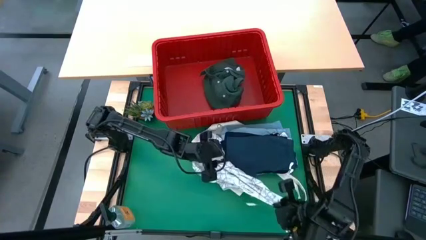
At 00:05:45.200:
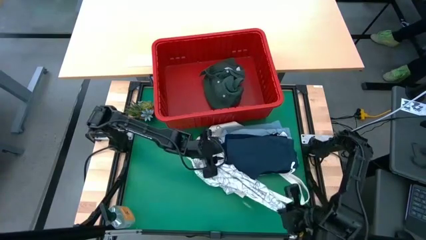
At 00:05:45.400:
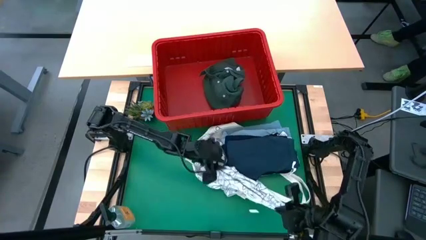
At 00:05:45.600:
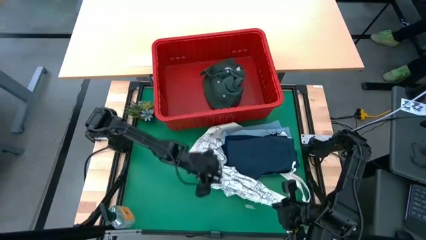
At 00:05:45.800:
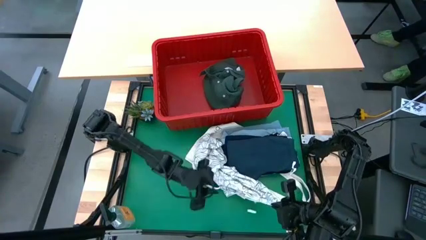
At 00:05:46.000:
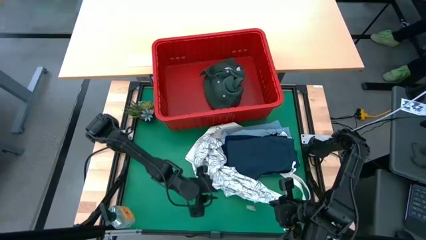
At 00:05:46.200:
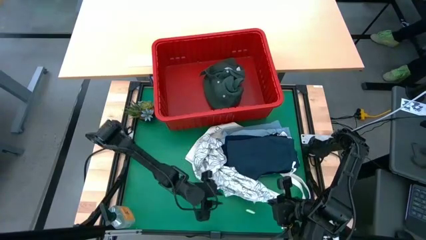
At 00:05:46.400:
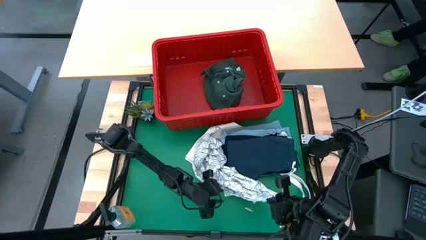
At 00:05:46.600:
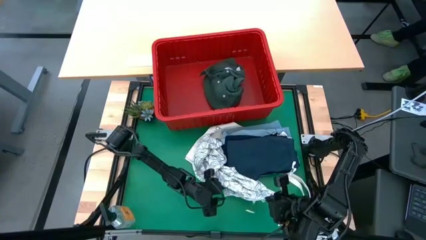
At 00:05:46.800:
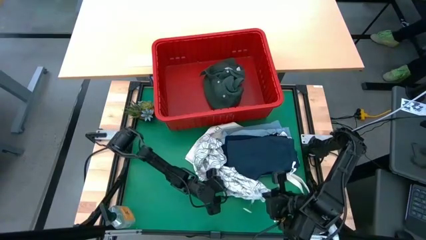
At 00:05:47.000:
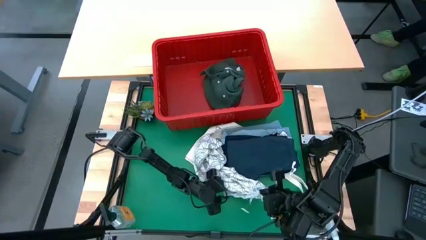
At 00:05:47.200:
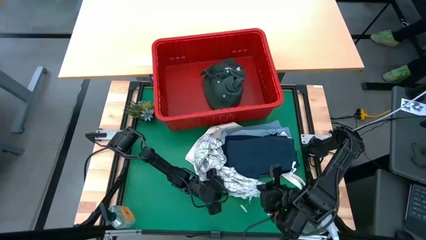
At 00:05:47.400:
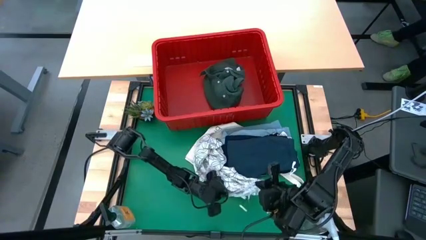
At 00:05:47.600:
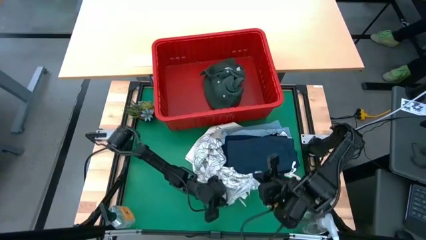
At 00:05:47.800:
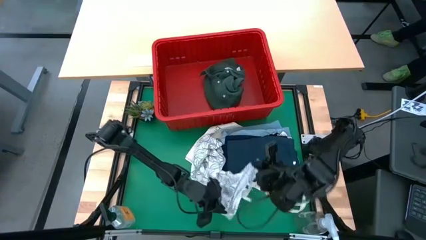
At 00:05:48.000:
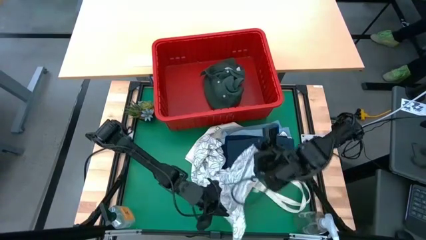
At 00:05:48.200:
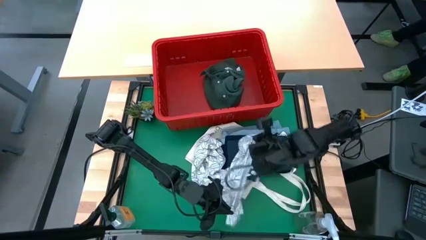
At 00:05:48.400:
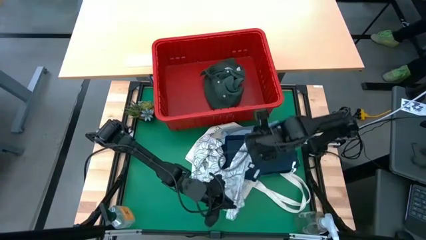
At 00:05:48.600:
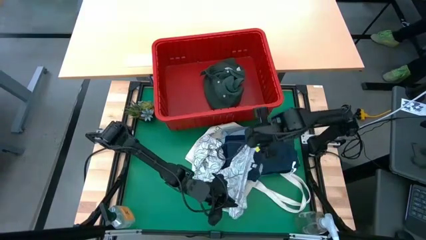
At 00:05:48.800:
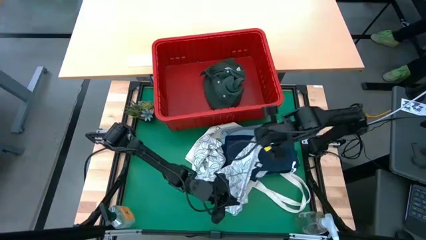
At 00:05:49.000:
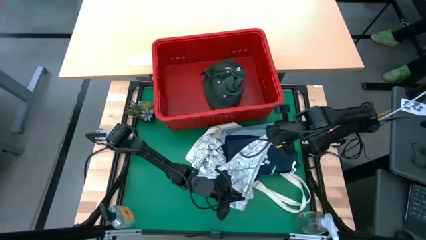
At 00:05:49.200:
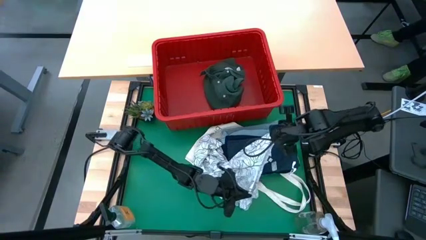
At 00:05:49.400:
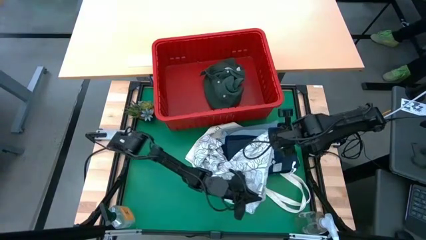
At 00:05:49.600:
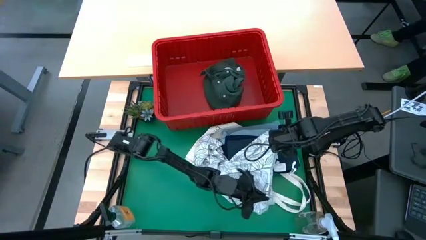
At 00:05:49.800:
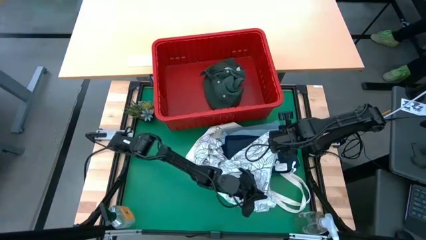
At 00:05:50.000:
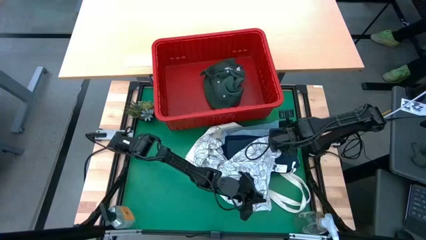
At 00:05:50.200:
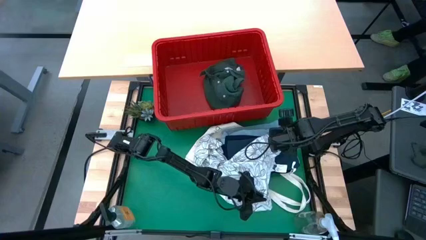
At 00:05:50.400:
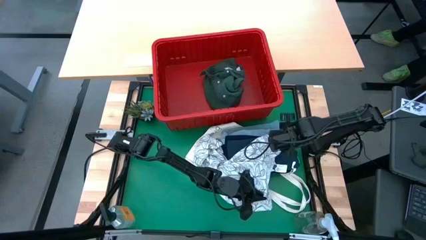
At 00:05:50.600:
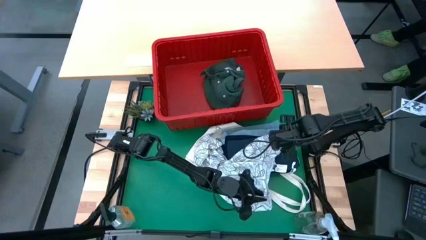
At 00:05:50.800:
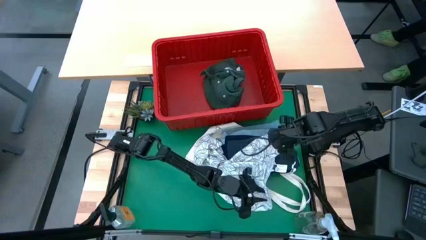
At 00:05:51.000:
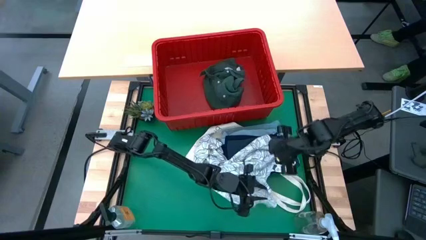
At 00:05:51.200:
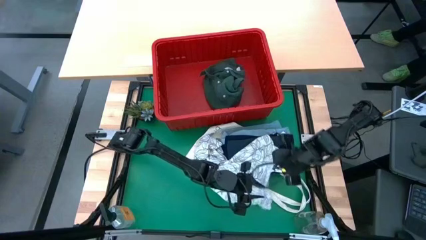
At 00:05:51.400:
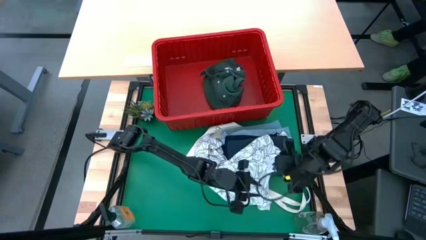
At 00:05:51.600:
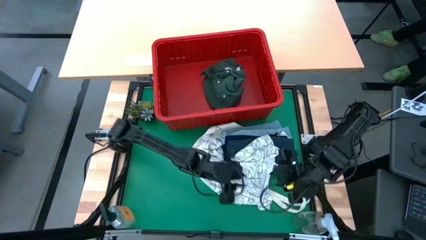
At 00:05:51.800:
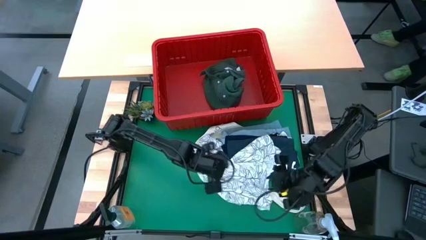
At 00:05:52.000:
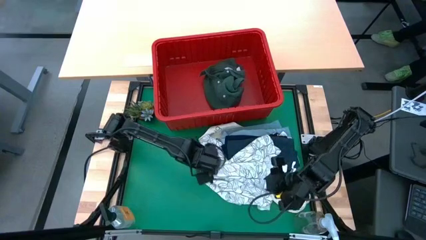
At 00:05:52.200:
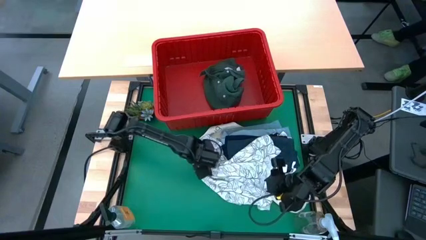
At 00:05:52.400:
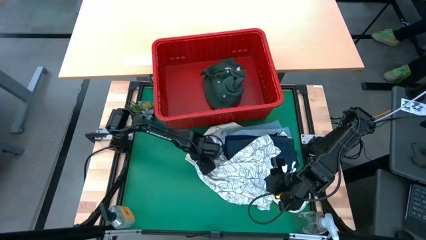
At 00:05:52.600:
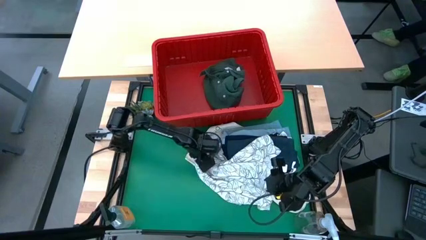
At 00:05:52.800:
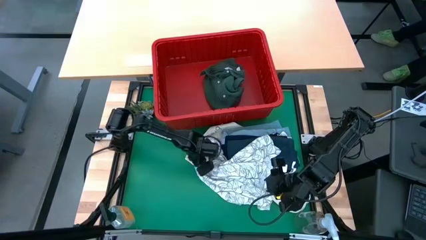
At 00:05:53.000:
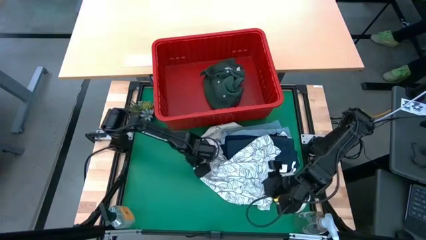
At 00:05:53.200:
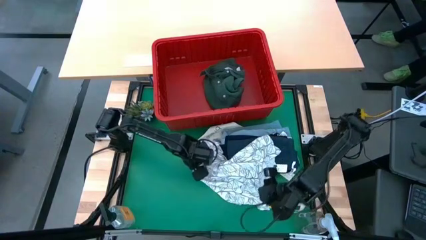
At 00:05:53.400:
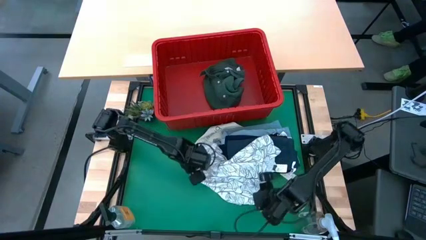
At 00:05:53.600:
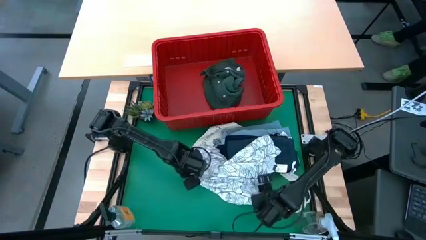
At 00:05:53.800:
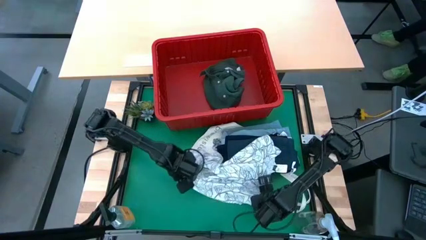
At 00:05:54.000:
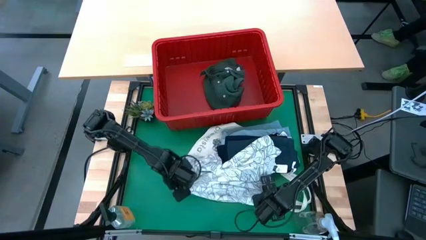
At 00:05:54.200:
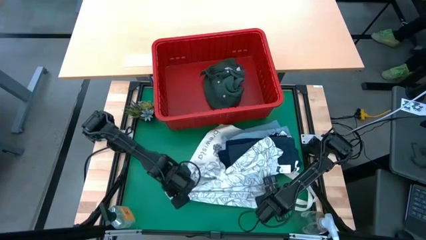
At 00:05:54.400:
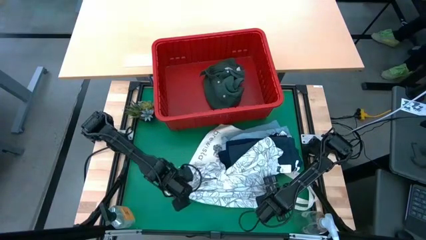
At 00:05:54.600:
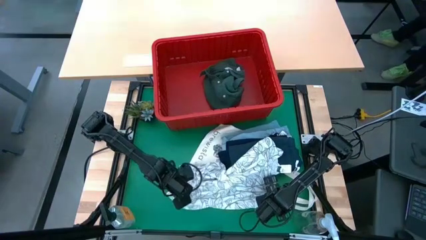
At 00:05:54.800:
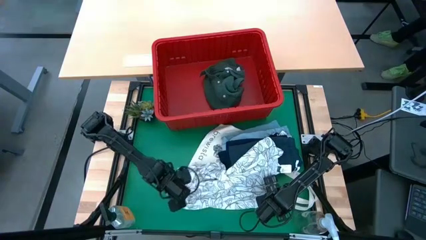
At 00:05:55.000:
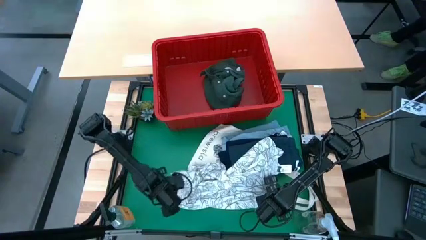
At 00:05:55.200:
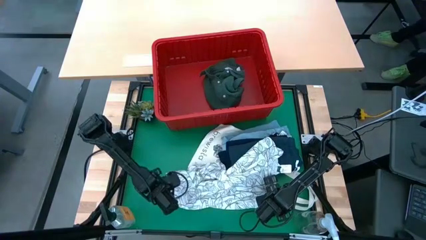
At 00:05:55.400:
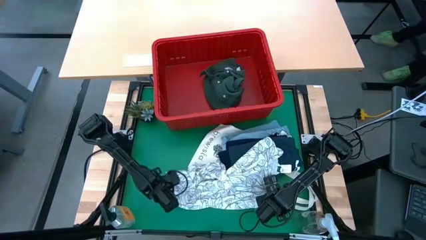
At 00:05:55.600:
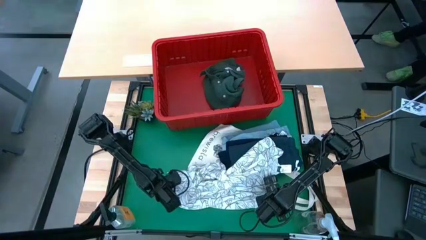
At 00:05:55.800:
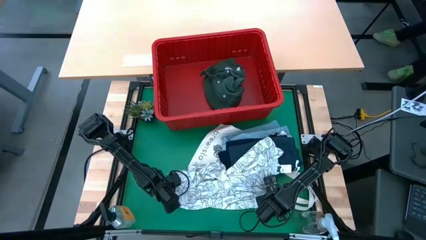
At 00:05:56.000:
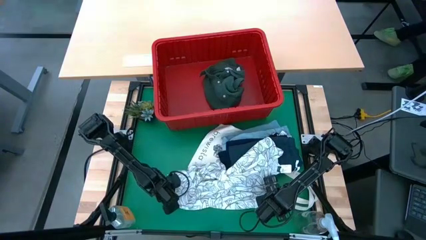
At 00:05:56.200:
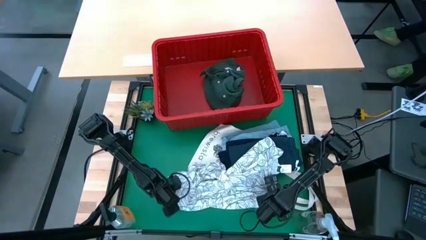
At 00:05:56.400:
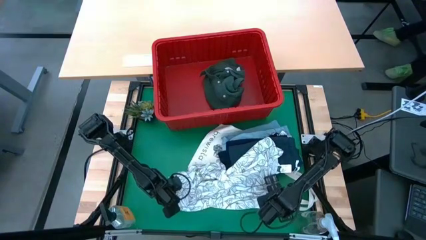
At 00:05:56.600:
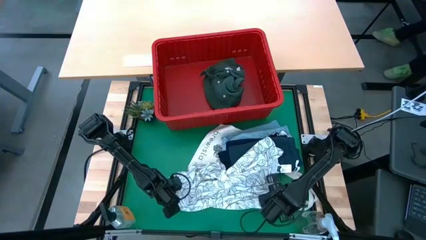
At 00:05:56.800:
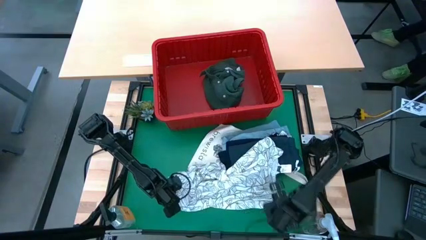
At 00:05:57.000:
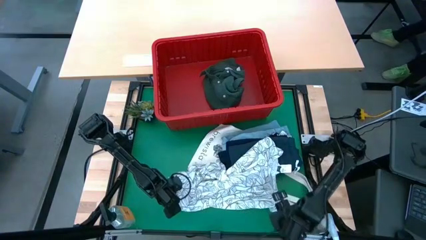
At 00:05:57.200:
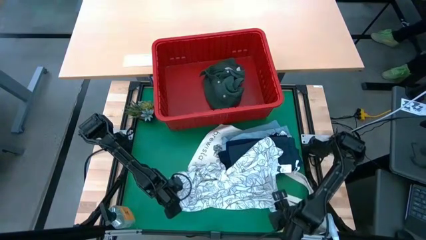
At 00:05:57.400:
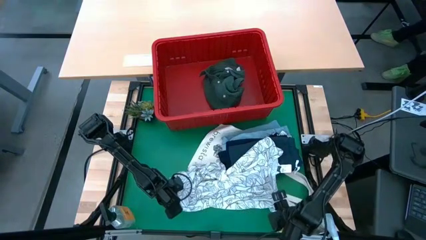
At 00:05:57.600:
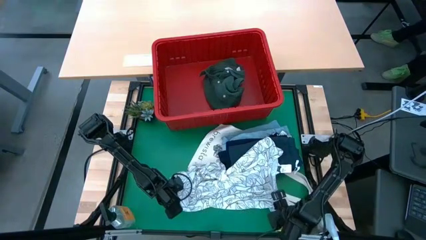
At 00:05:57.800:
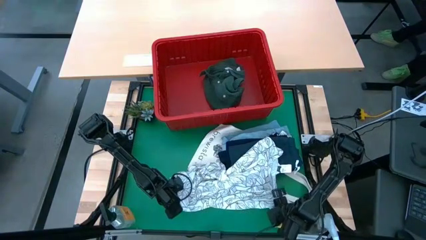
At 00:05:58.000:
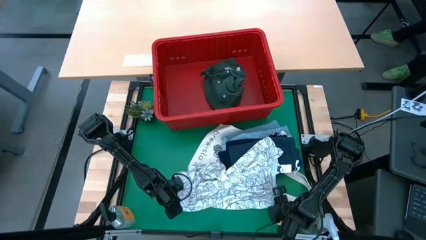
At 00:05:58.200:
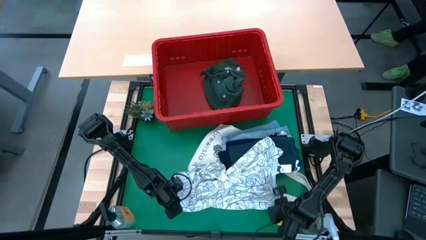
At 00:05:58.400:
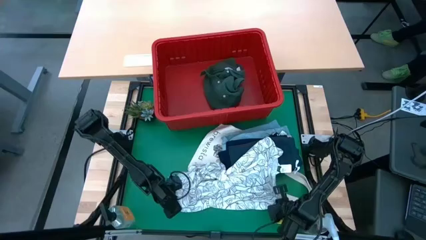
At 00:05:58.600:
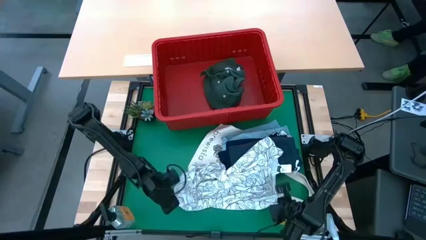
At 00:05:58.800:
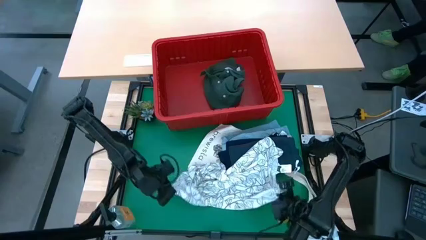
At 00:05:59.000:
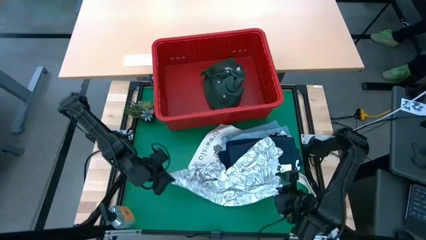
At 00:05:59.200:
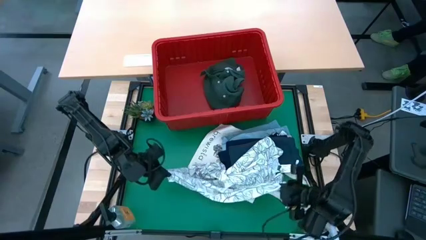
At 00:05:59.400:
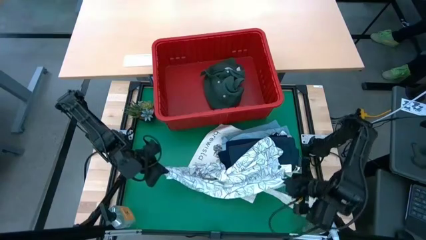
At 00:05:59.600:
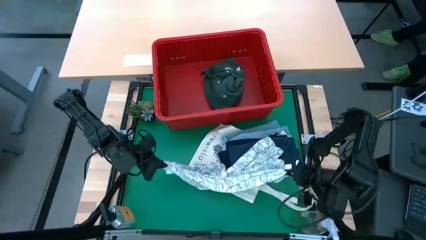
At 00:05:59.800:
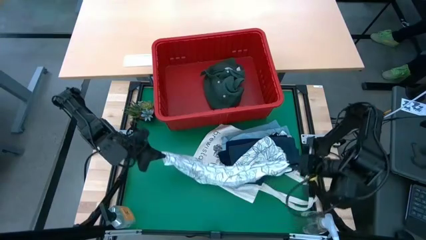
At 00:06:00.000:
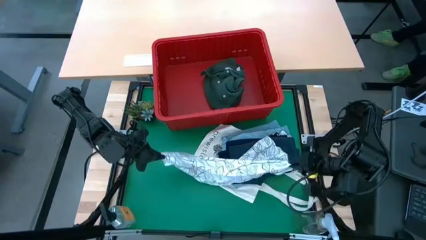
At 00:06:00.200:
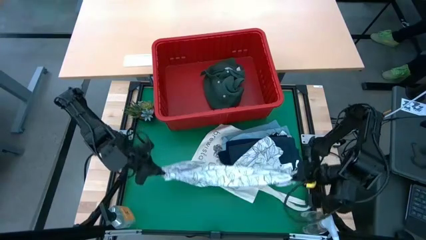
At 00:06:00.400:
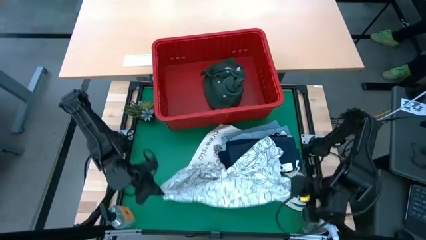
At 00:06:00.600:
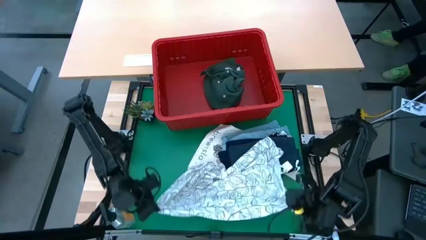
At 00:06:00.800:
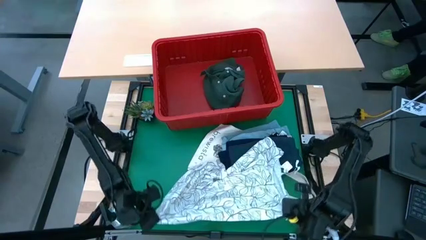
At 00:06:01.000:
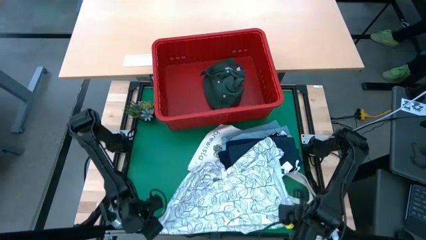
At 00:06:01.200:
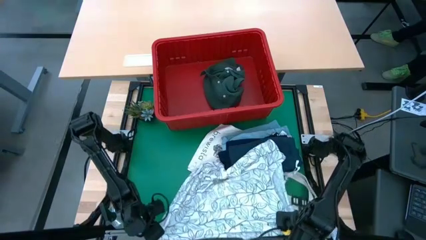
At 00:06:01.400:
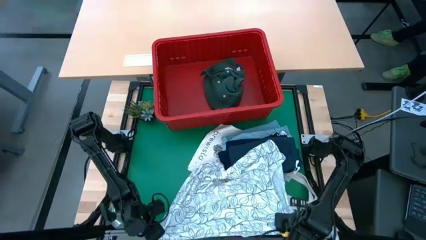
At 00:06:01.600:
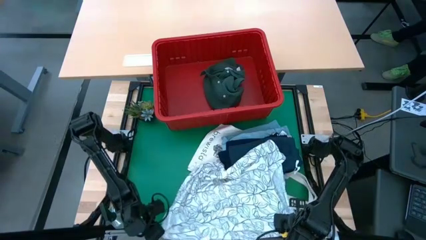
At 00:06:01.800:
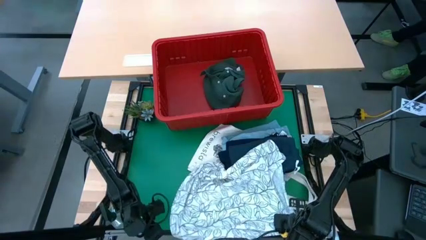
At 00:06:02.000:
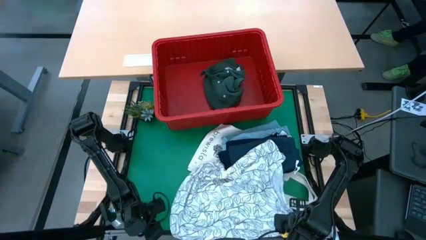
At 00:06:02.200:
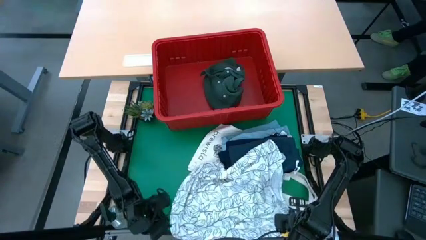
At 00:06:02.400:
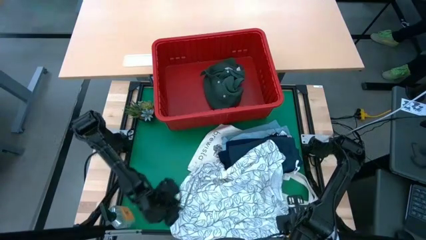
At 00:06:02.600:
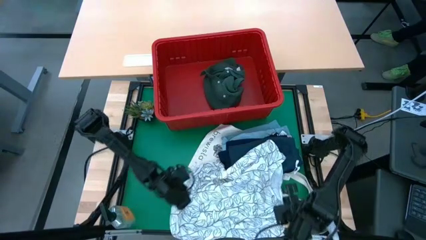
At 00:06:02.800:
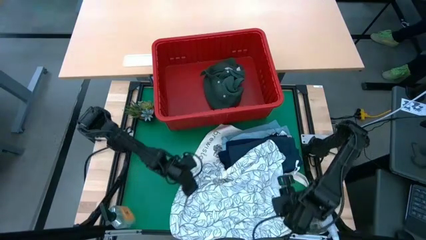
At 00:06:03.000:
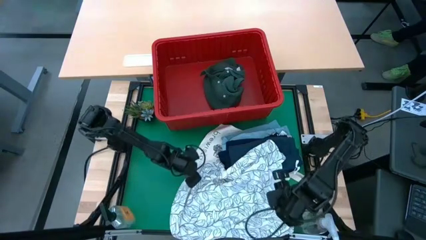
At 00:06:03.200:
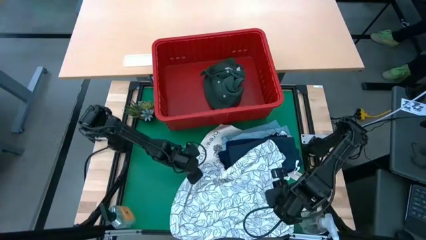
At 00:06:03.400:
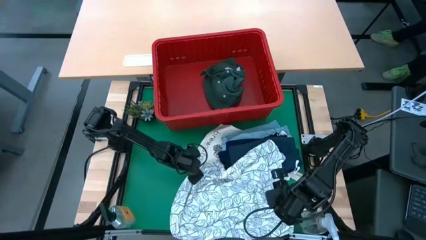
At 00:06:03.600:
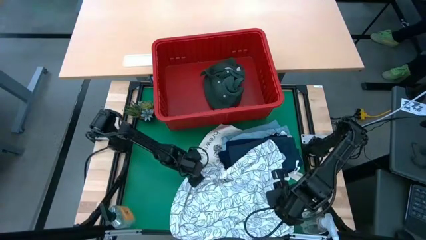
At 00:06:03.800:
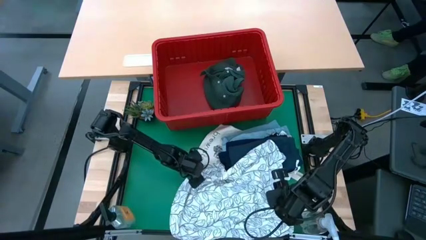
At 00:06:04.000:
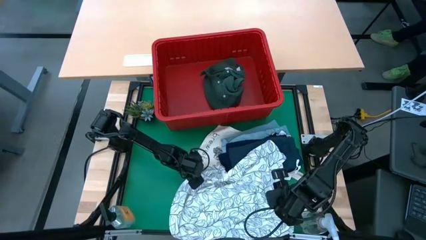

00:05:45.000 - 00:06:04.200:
Task: Fold laundry
Fold the patterned white shirt
